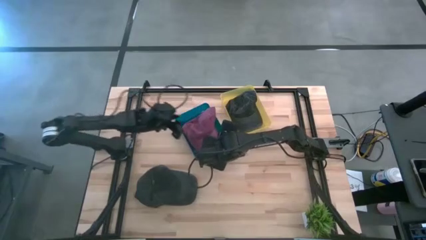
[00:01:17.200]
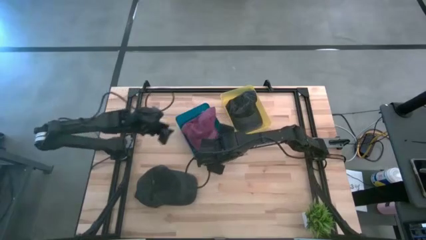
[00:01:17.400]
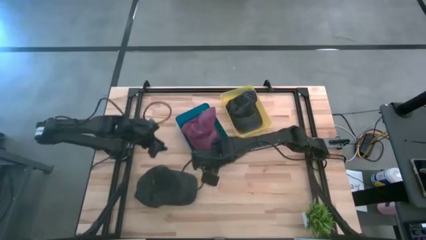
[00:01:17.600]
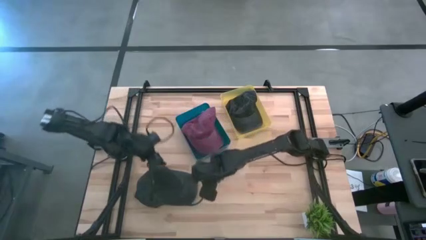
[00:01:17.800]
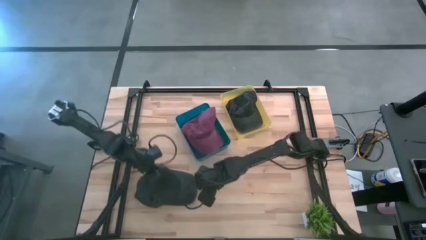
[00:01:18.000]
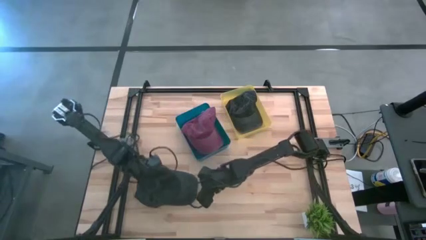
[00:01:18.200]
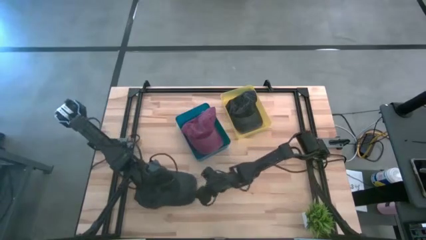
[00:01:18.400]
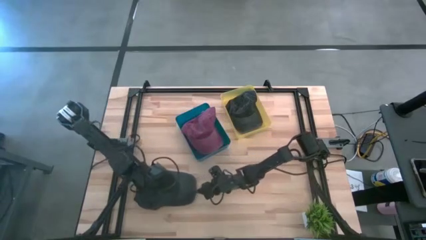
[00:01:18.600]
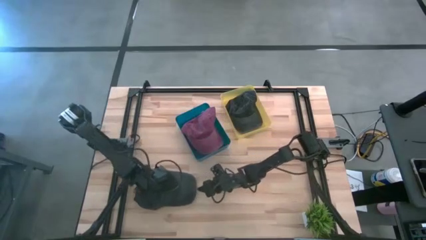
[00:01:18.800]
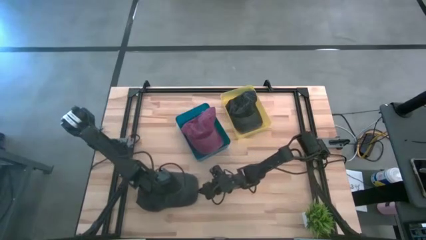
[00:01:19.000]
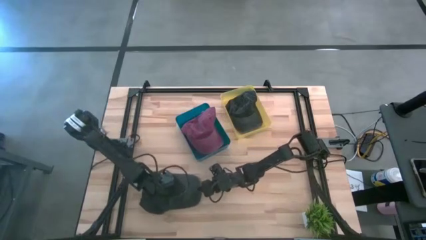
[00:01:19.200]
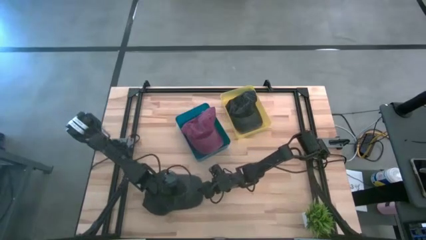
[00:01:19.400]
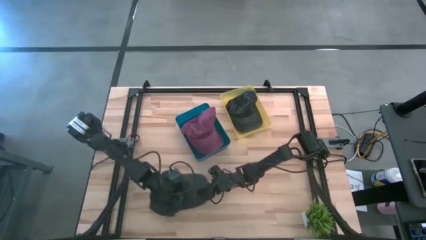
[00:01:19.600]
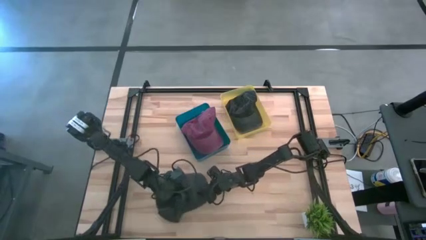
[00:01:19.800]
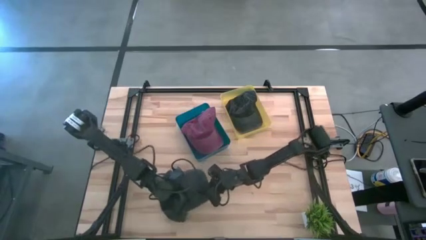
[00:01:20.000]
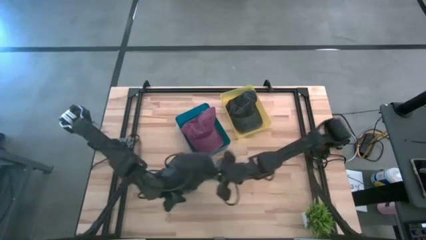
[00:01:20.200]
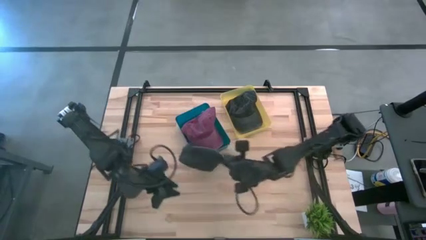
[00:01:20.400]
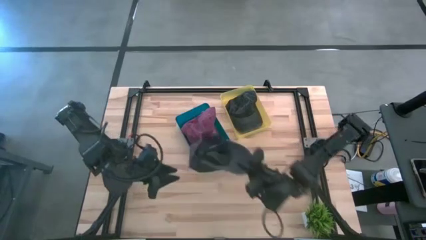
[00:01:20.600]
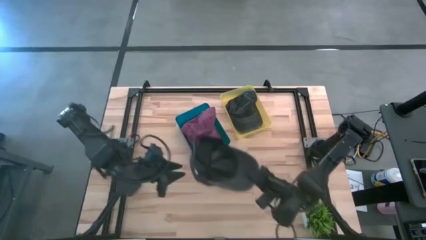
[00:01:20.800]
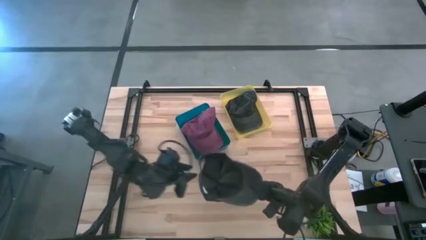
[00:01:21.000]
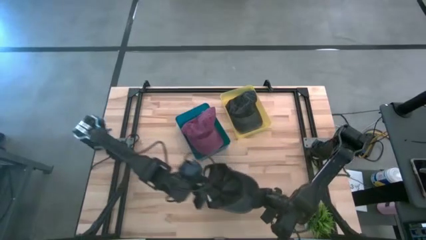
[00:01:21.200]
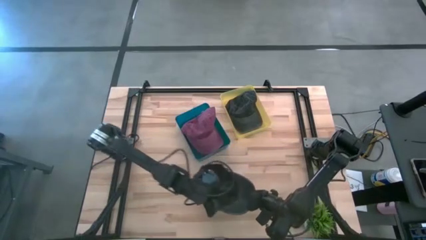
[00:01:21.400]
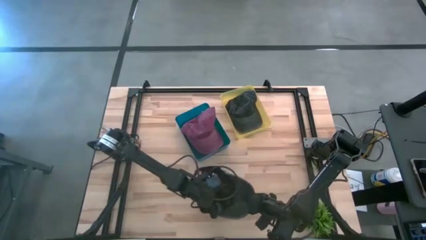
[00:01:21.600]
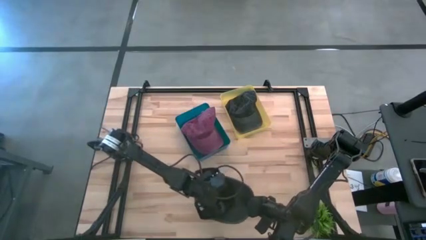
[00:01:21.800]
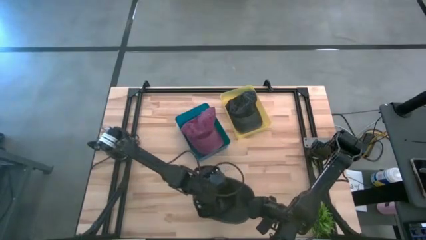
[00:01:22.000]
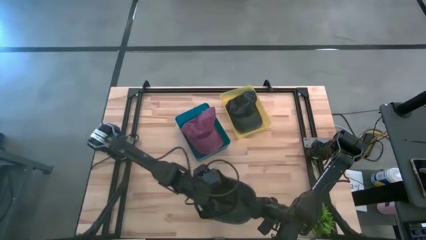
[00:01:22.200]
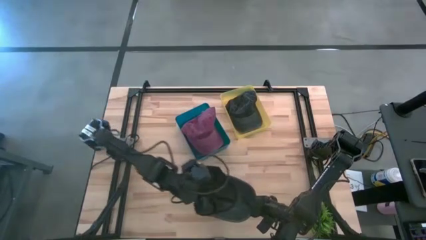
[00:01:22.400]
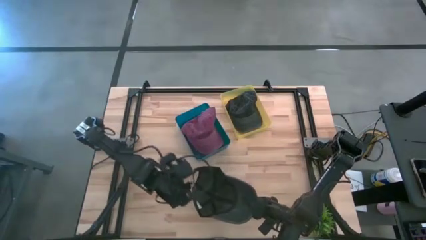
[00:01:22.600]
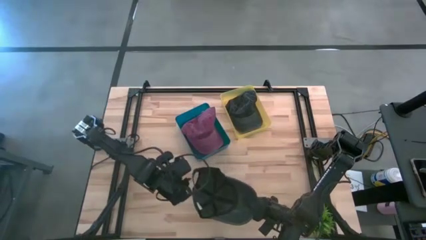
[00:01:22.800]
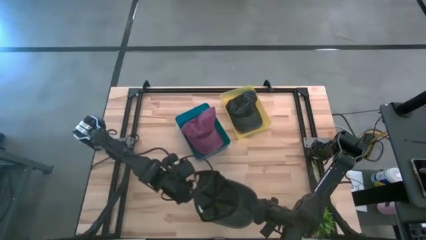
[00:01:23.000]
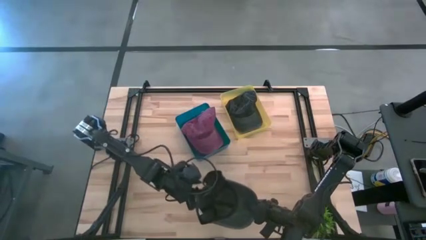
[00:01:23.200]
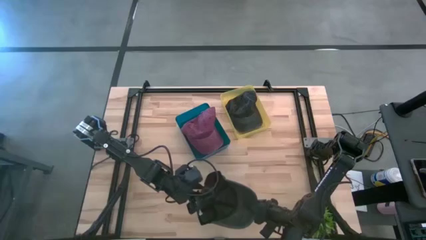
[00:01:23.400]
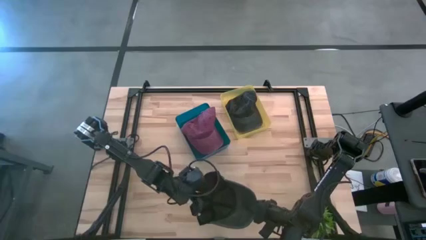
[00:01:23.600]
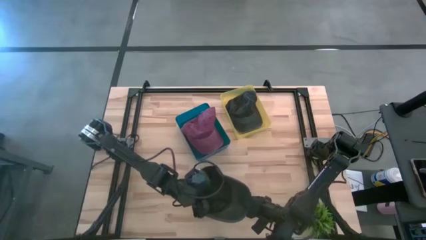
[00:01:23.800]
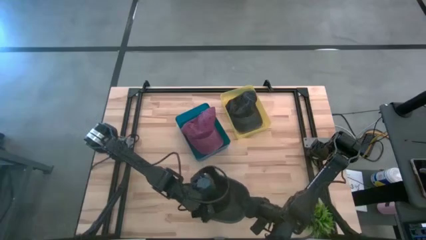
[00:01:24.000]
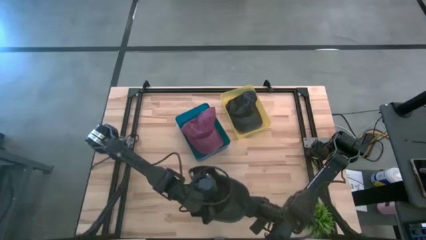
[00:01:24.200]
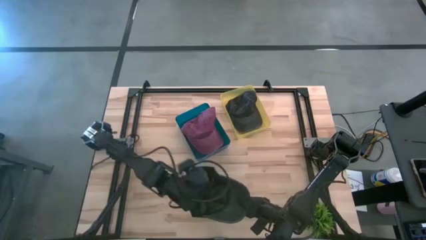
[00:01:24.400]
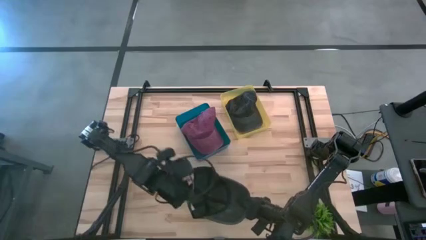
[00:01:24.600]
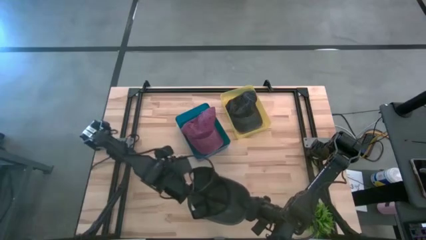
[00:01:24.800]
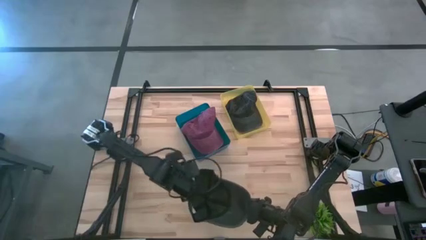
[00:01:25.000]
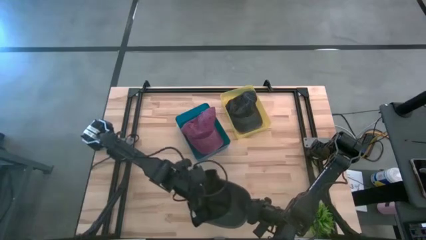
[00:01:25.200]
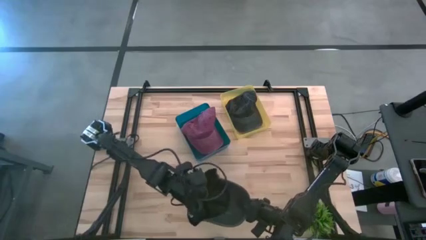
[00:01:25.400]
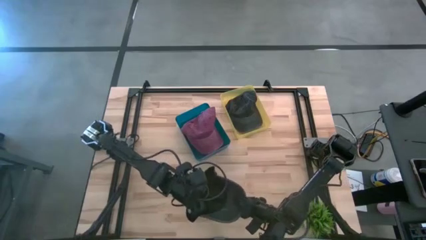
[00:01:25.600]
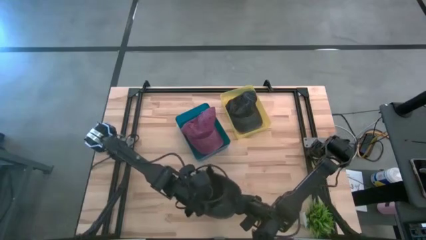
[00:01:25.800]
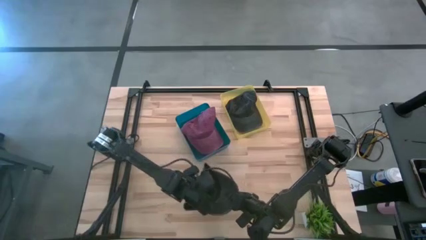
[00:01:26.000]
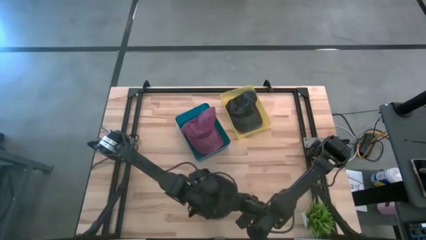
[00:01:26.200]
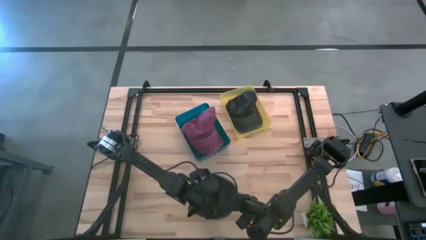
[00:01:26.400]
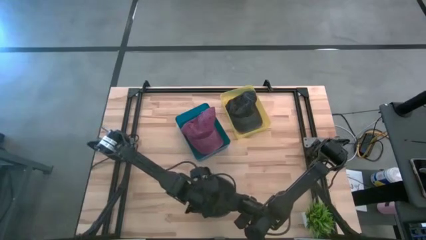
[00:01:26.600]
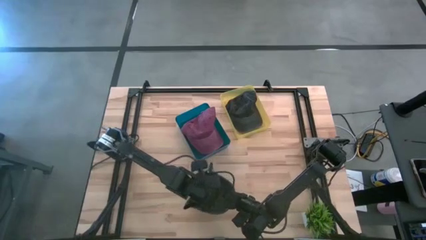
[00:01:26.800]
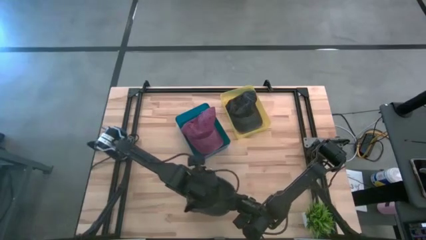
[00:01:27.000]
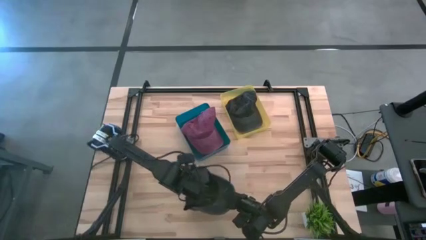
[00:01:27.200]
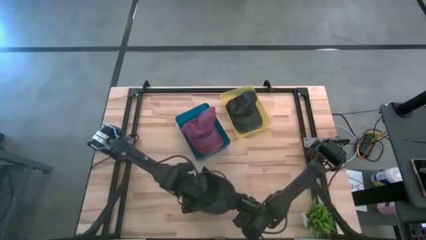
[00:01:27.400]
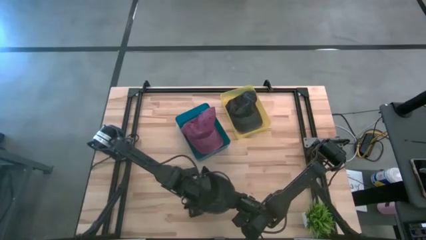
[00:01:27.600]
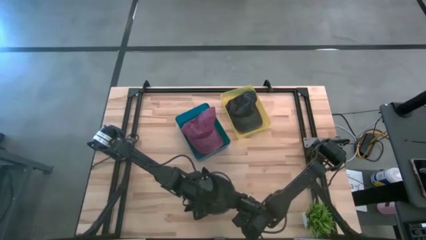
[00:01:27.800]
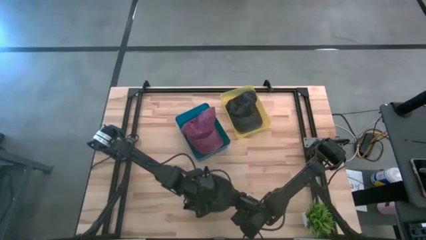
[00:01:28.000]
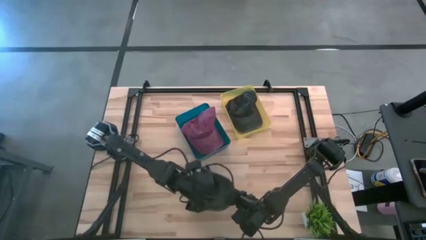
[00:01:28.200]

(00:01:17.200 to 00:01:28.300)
Task: Pick & Place hat
Put the black cap into the yellow bin

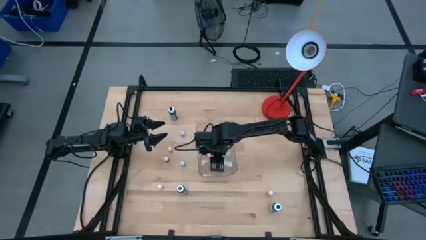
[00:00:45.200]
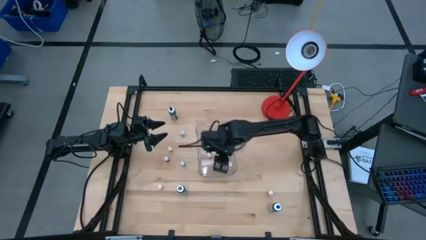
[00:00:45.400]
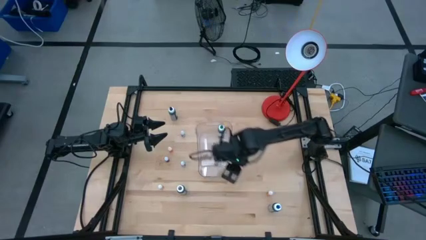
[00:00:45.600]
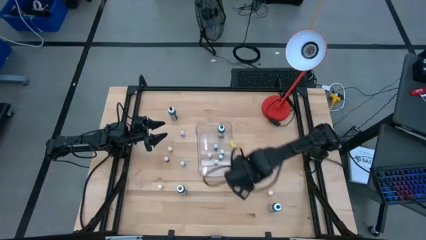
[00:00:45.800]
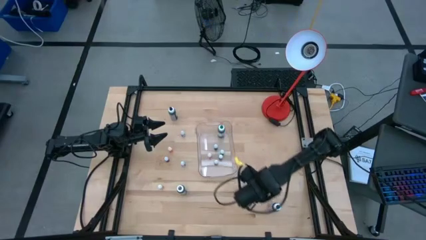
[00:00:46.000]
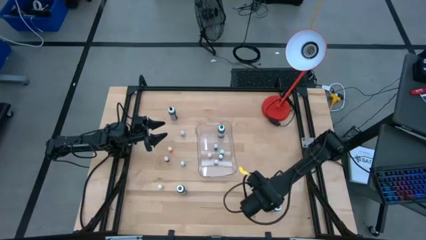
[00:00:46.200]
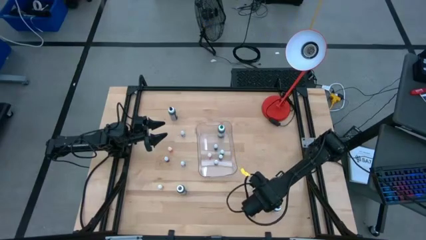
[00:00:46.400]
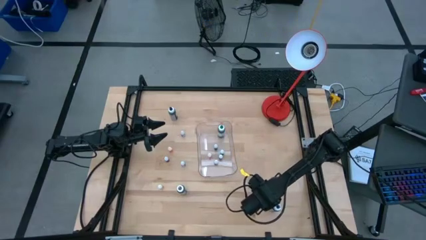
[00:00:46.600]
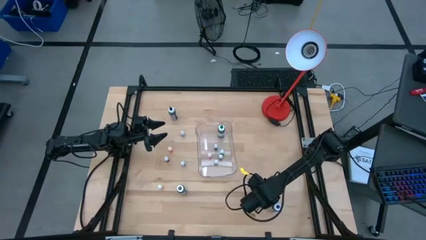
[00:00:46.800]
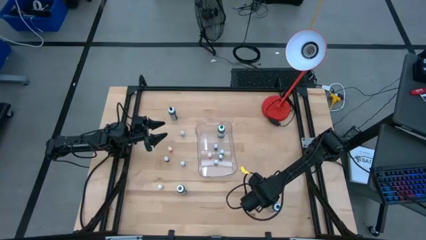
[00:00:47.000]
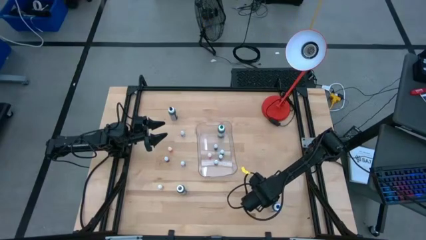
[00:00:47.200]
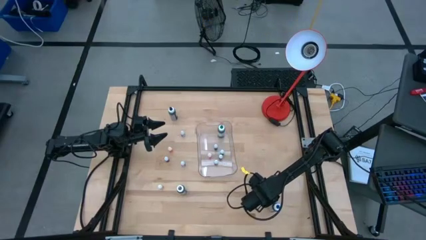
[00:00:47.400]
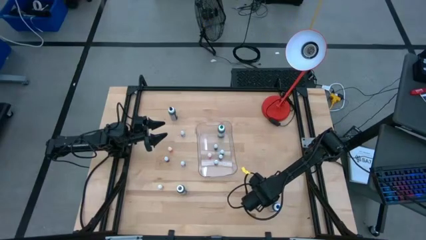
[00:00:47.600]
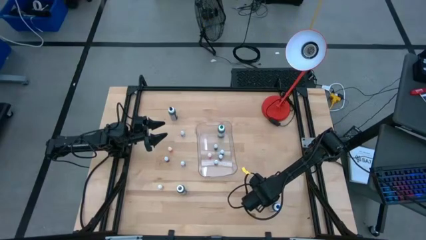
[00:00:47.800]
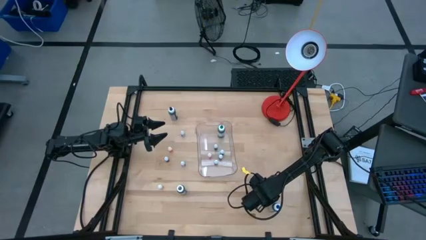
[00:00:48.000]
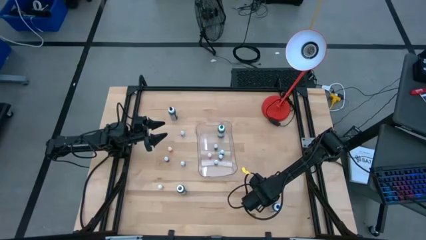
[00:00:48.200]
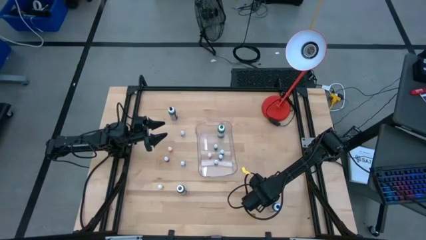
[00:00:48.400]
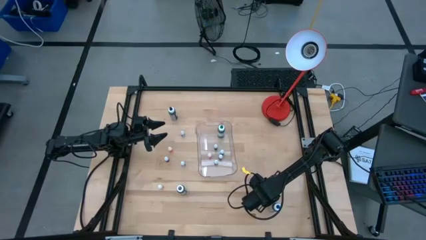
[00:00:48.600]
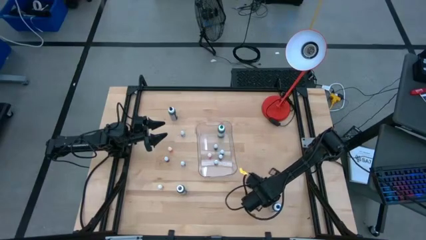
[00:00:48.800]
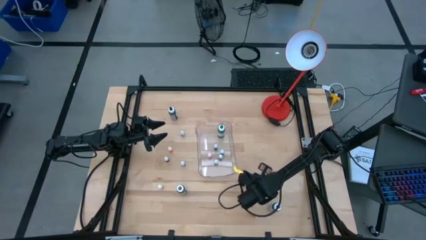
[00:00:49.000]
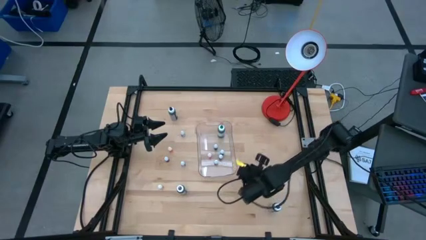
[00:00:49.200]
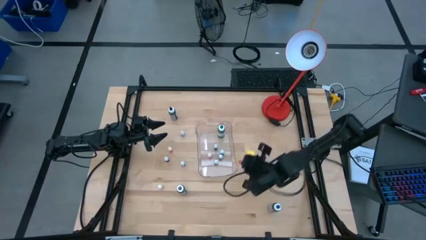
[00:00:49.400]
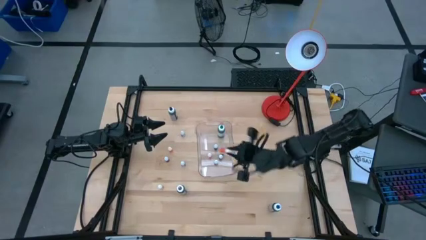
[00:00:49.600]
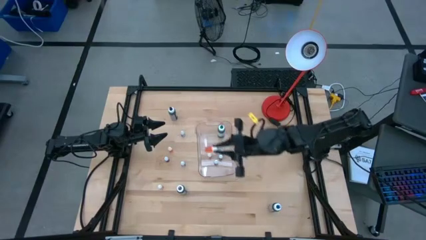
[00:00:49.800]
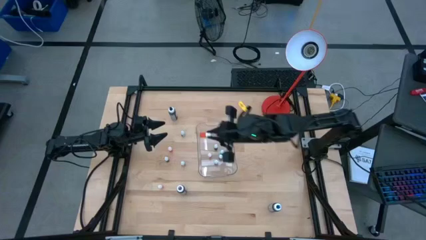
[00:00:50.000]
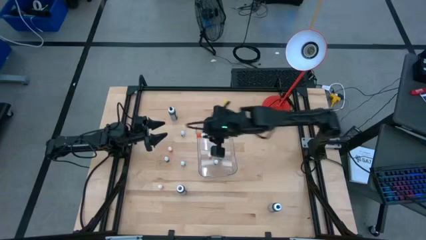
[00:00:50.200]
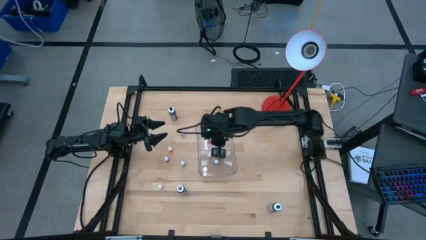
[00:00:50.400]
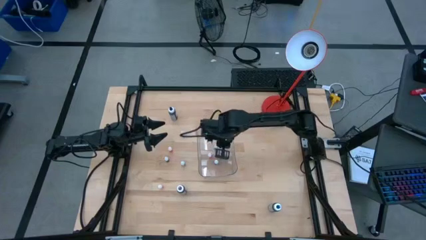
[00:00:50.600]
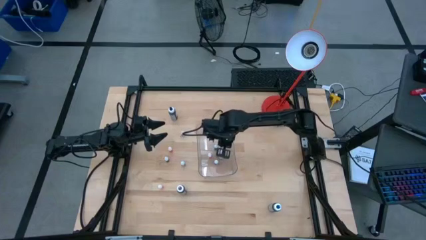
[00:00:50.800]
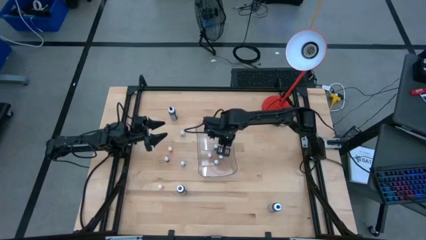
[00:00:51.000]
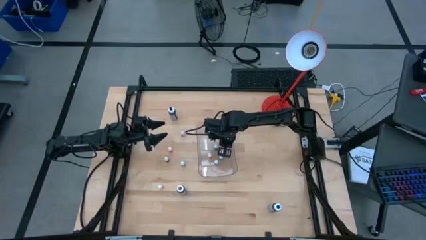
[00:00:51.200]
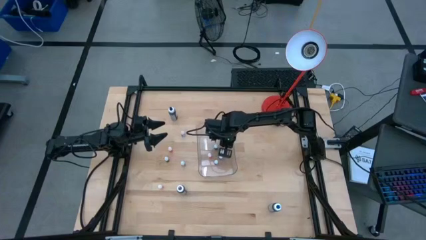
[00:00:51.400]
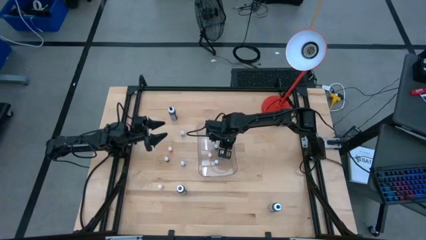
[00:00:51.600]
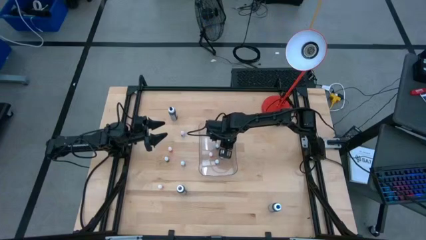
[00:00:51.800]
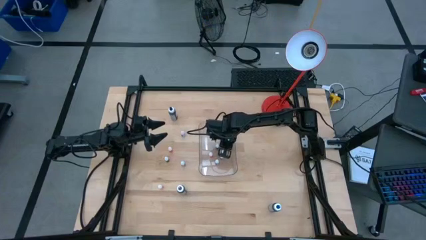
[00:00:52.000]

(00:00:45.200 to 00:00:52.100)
Task: Pick & Place food coloring
Put the small yellow food coloring bottle into the transparent bin
